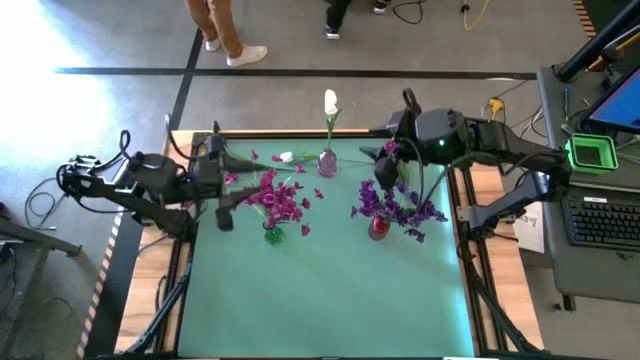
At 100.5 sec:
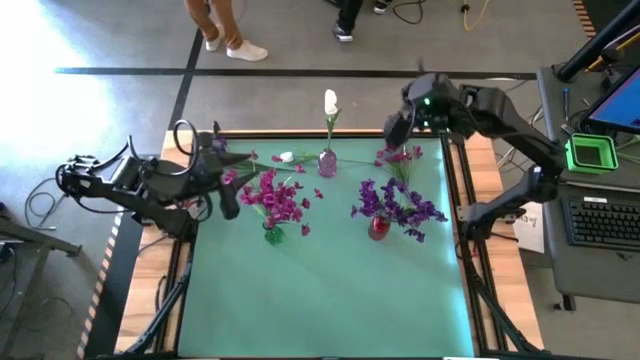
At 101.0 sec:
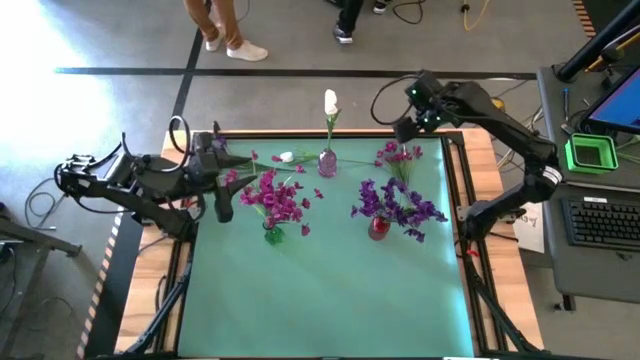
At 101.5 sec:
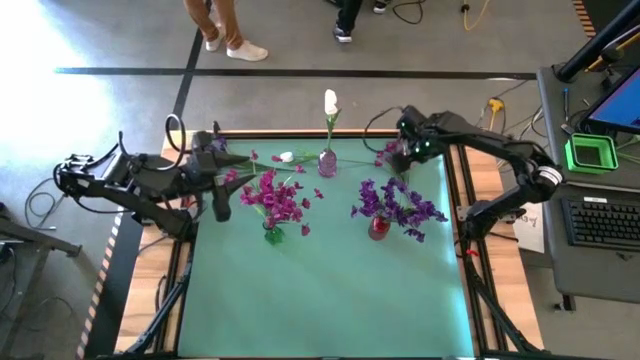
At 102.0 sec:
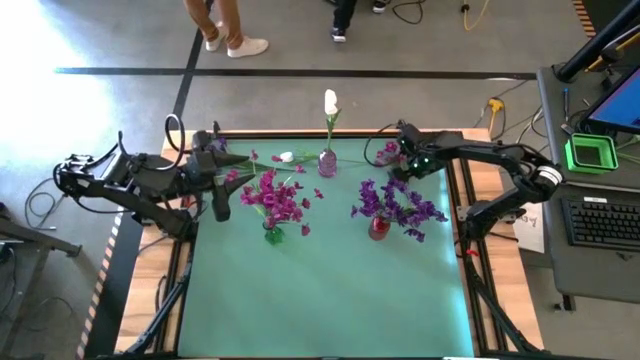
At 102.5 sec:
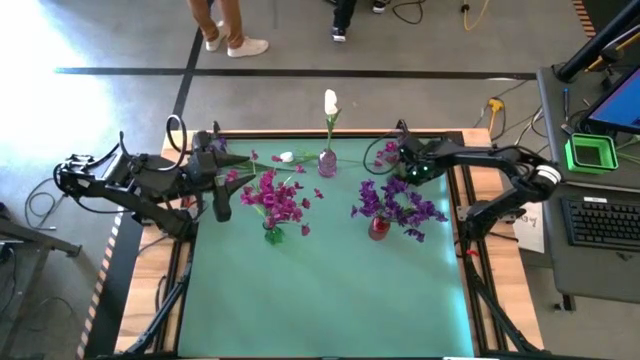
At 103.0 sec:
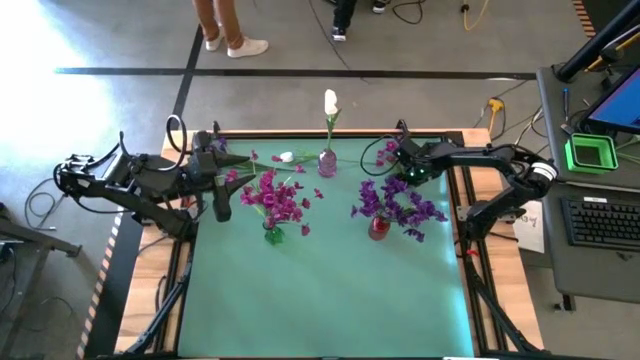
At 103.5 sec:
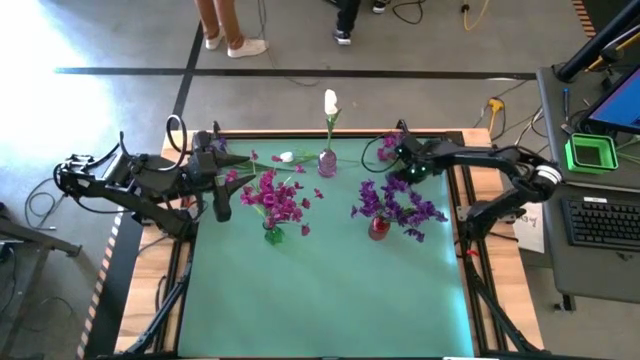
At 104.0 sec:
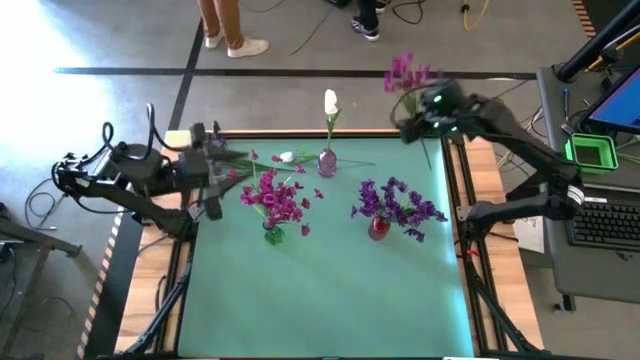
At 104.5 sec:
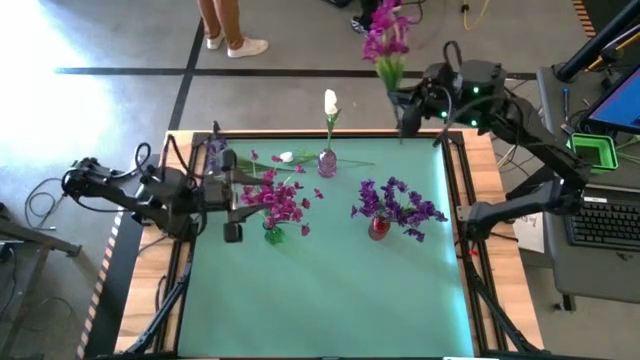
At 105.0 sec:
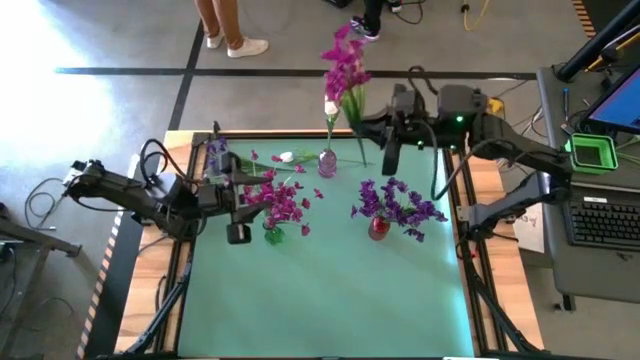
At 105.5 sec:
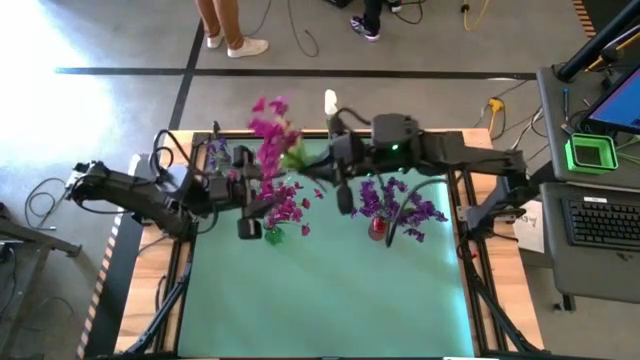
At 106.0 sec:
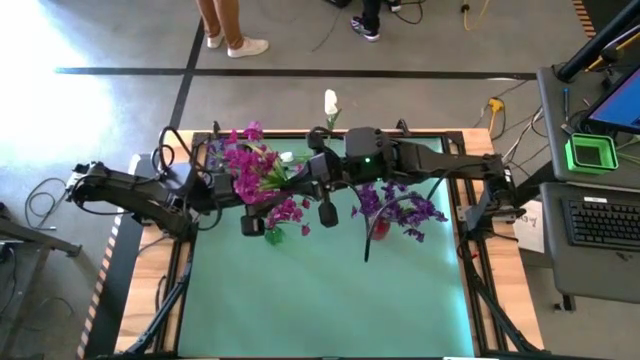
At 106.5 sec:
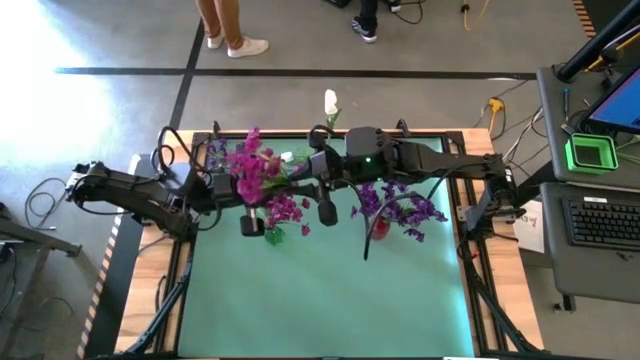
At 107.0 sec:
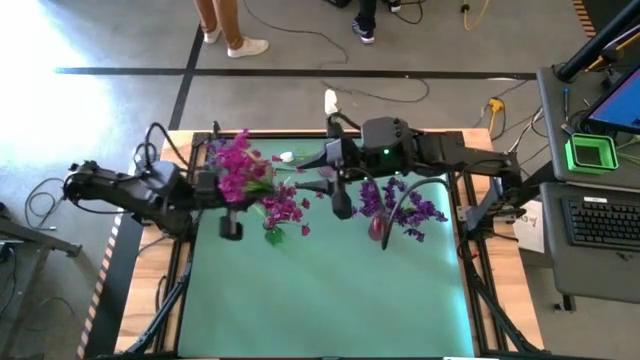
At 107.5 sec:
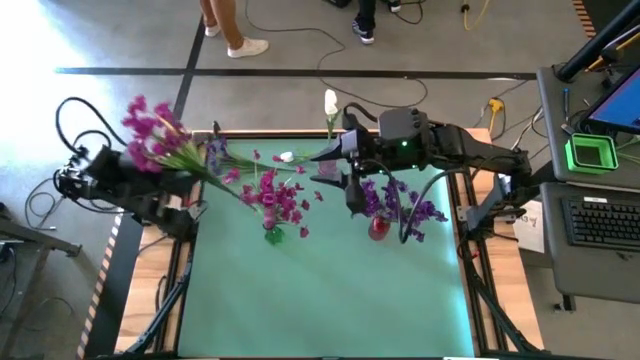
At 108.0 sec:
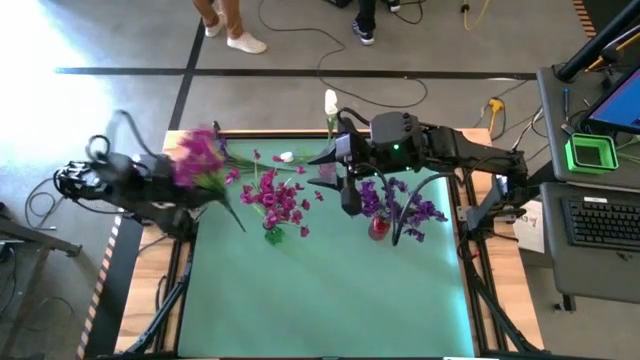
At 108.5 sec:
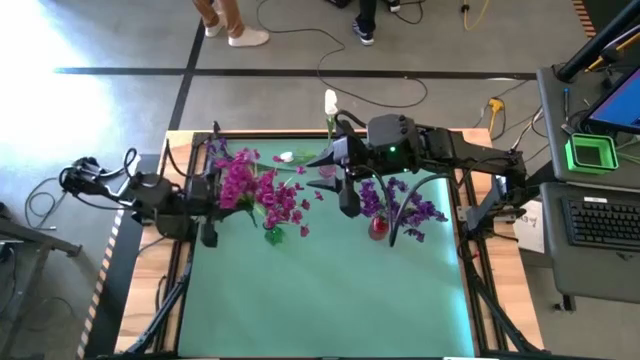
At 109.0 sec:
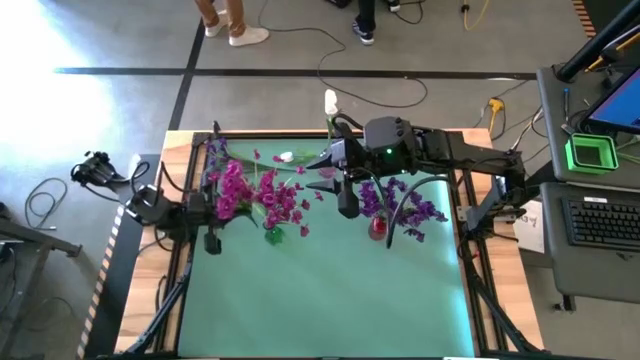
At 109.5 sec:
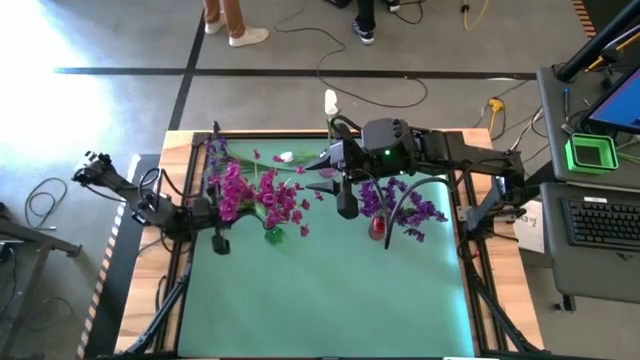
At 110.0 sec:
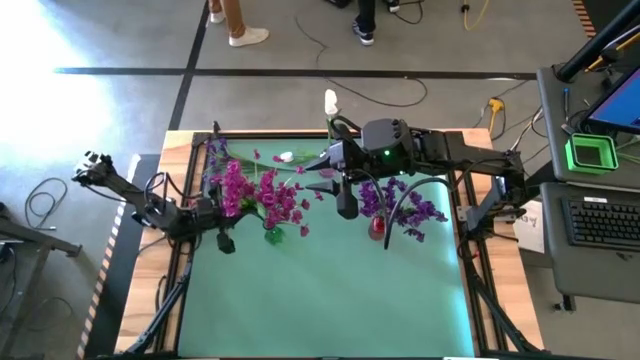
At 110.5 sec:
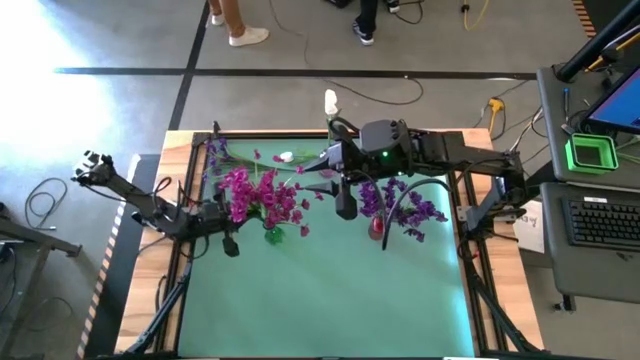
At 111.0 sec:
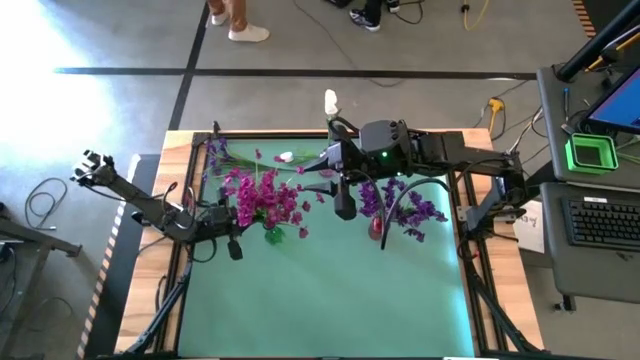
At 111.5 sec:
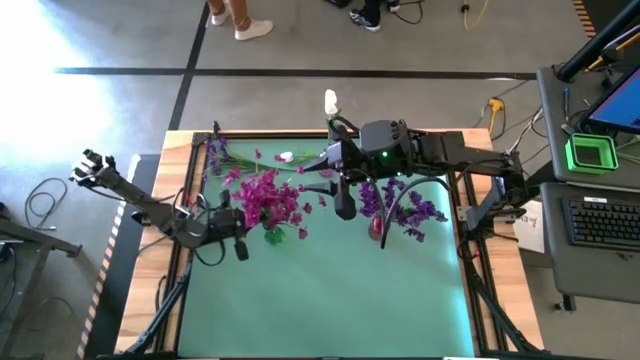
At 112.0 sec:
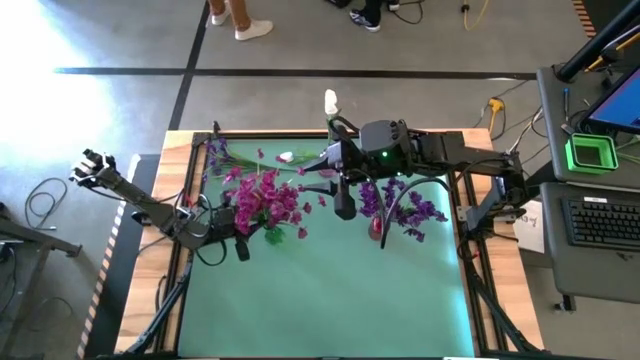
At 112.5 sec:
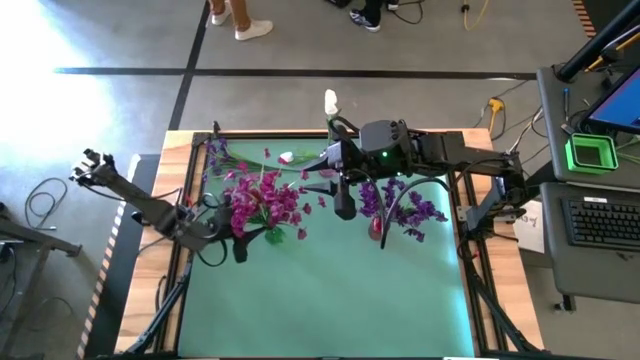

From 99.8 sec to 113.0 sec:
Task: Sort flowers into vase by color
Put the pink flowers into the green flower vase

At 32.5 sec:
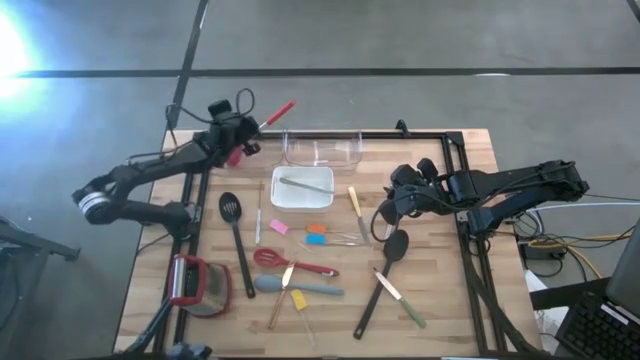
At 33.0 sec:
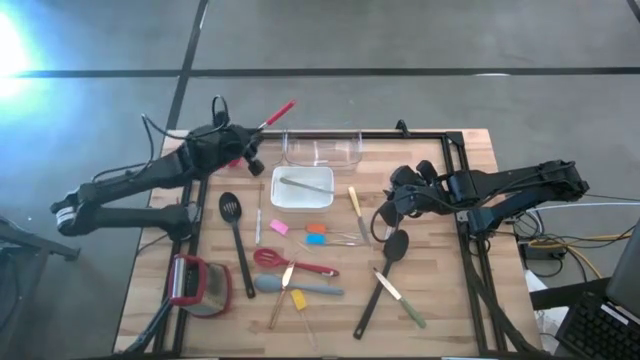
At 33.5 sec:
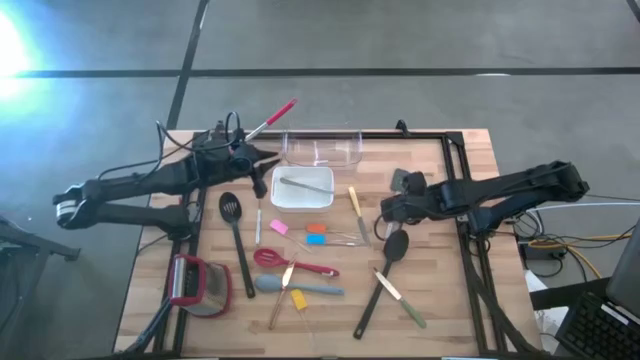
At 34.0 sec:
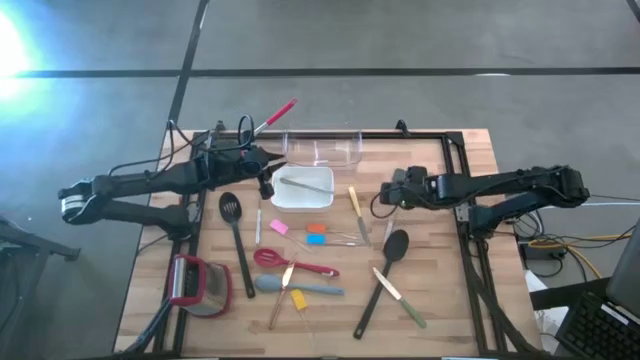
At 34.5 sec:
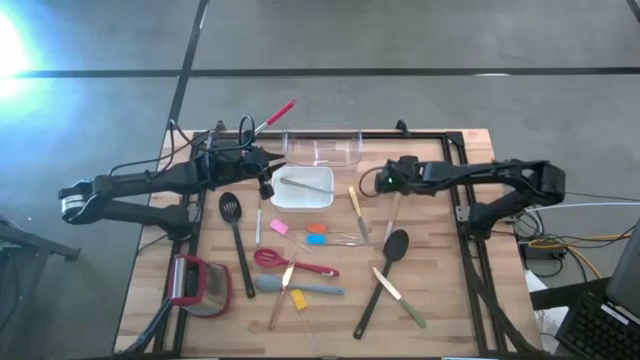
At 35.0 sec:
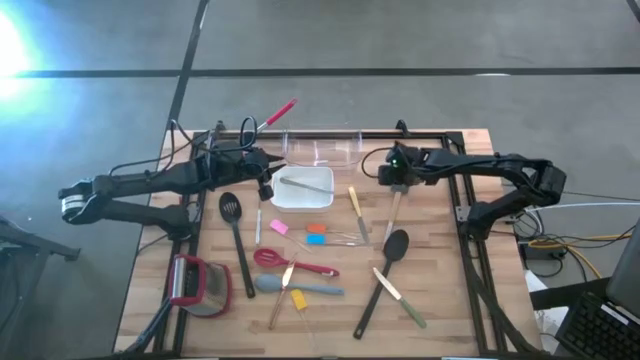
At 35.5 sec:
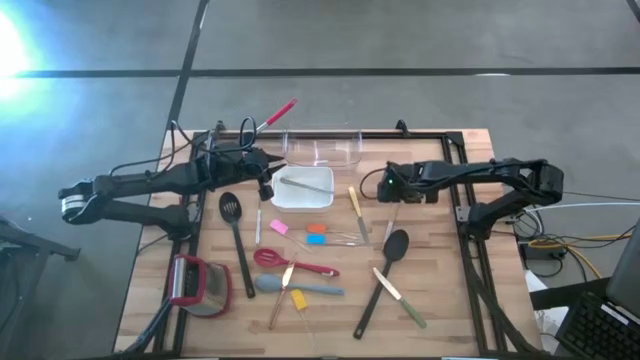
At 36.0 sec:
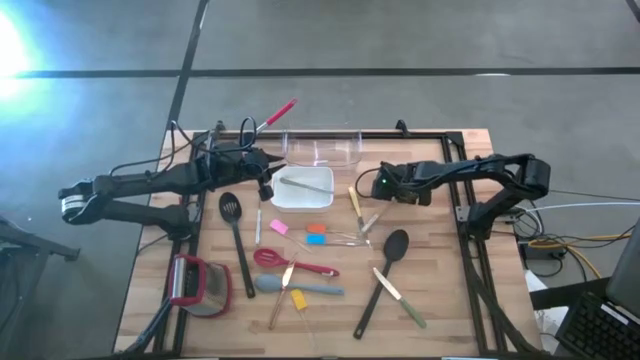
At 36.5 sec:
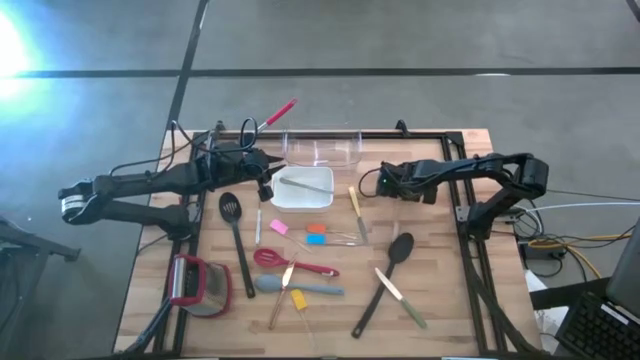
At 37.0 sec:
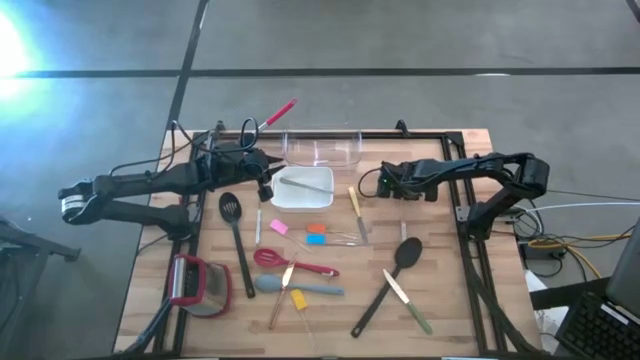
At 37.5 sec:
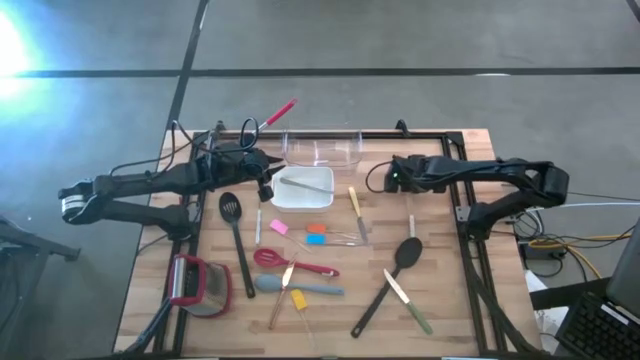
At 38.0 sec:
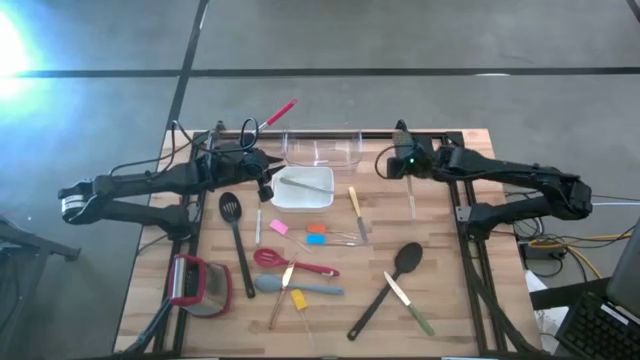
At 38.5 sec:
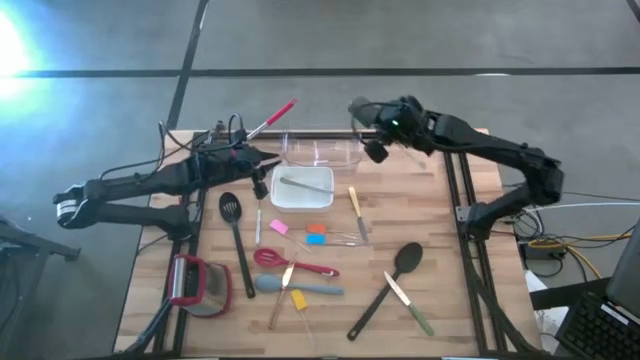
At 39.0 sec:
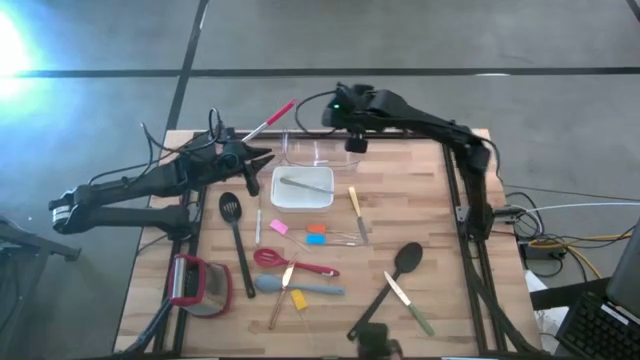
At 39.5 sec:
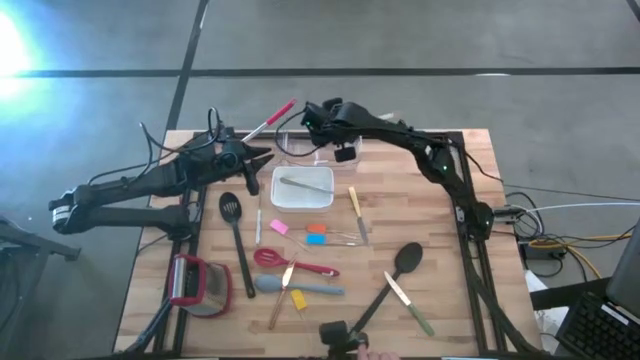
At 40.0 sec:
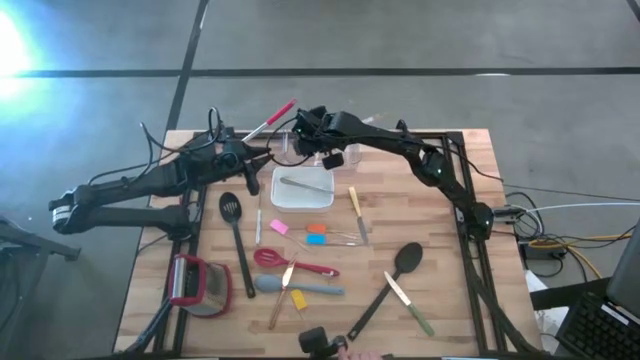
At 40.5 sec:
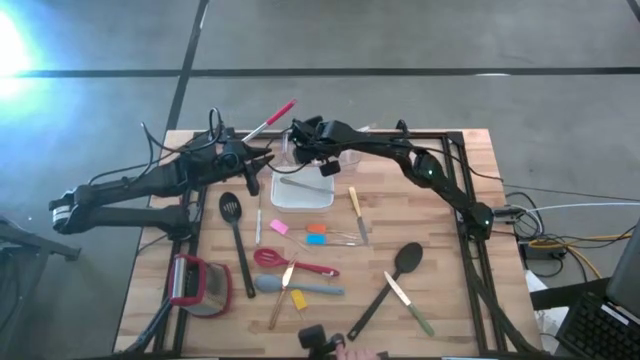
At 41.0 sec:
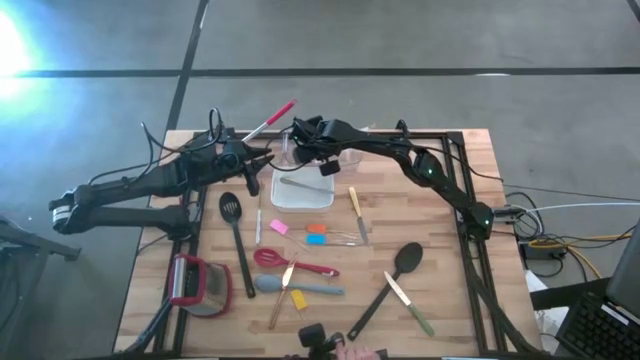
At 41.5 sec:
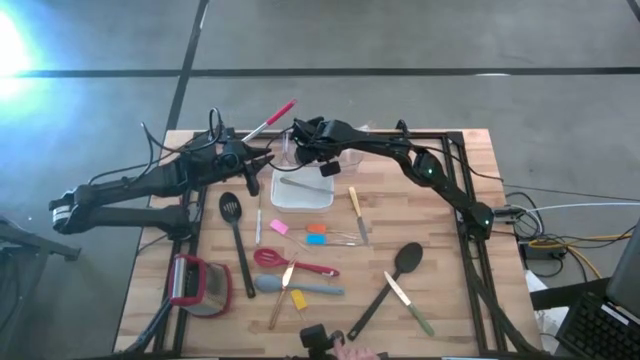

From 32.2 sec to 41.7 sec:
Task: Pick & Place Kitchen Items
Put the gray spatula into the right transparent bin
